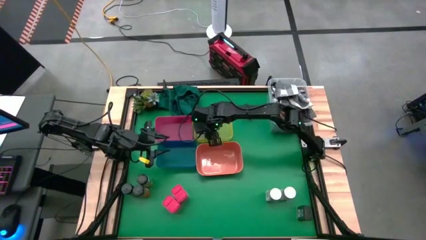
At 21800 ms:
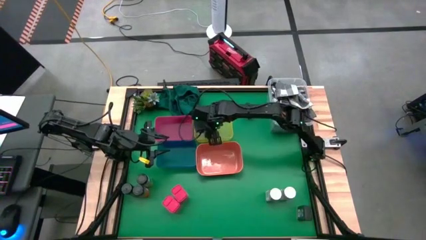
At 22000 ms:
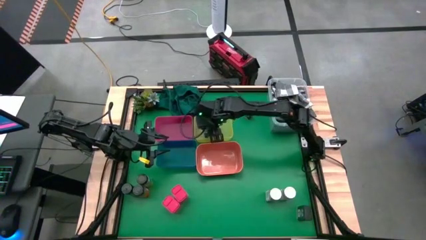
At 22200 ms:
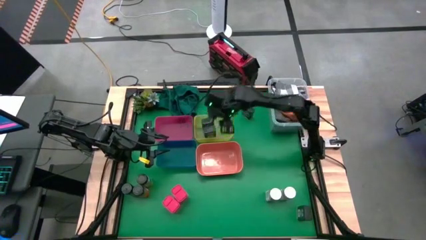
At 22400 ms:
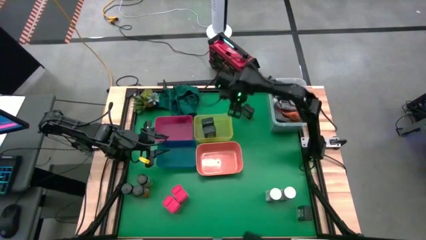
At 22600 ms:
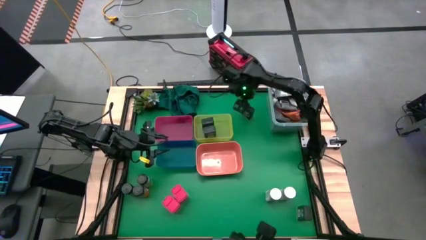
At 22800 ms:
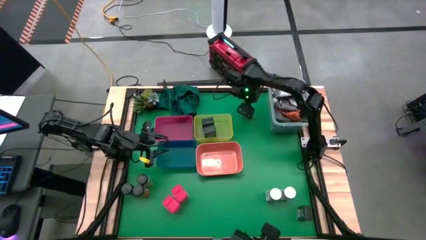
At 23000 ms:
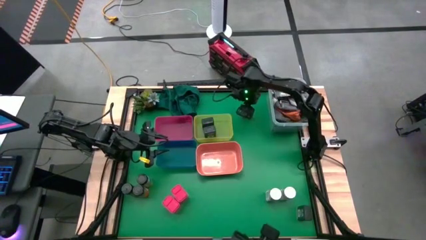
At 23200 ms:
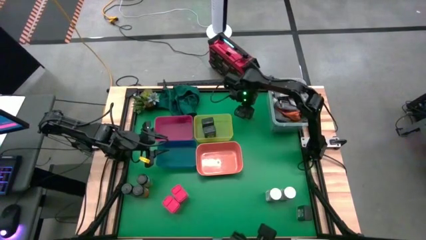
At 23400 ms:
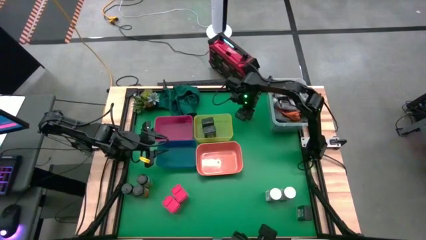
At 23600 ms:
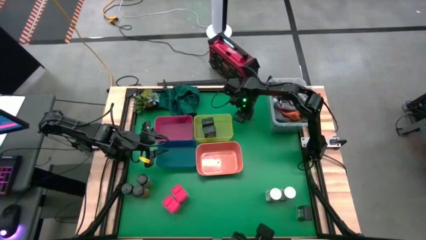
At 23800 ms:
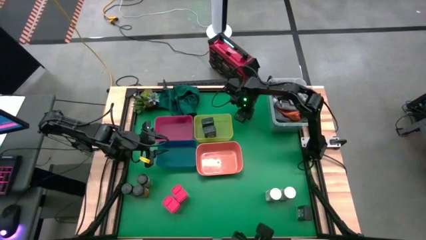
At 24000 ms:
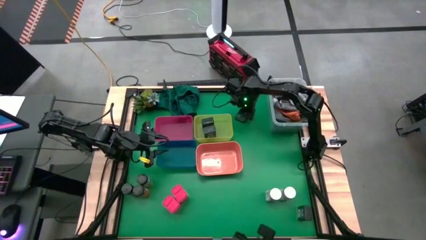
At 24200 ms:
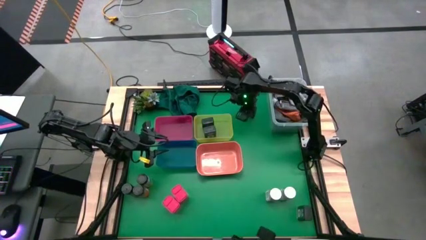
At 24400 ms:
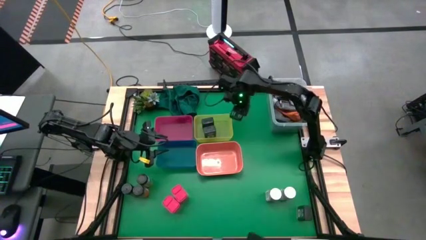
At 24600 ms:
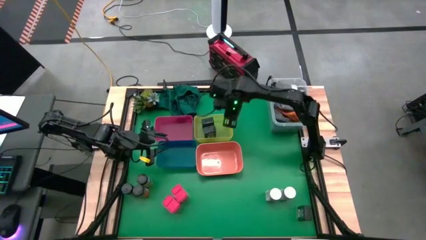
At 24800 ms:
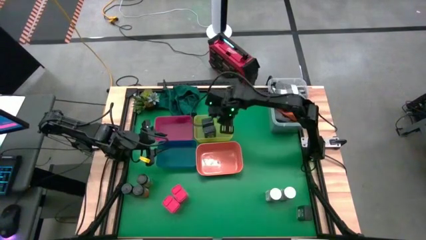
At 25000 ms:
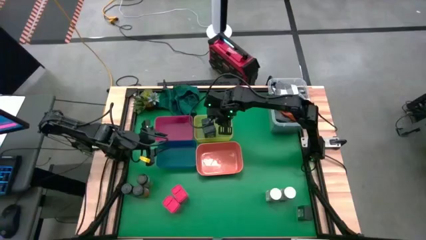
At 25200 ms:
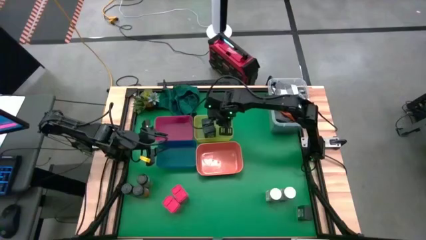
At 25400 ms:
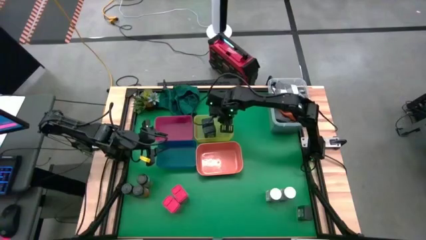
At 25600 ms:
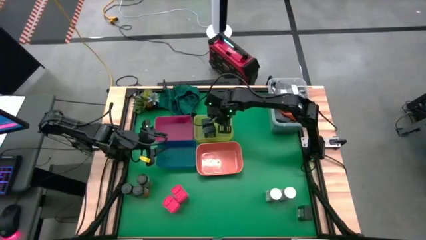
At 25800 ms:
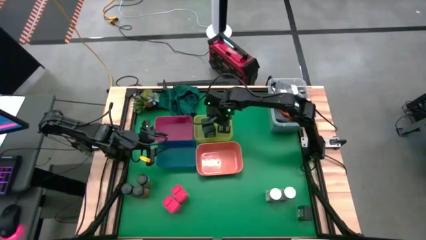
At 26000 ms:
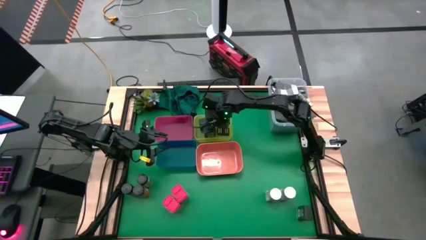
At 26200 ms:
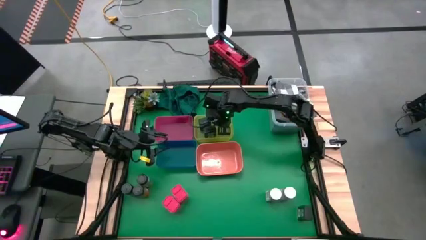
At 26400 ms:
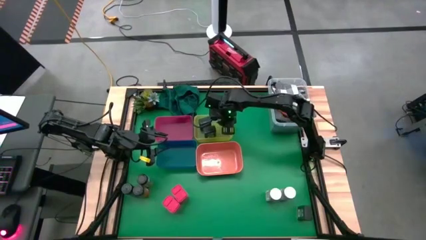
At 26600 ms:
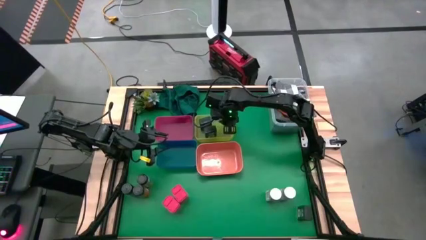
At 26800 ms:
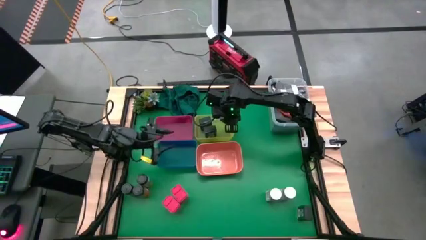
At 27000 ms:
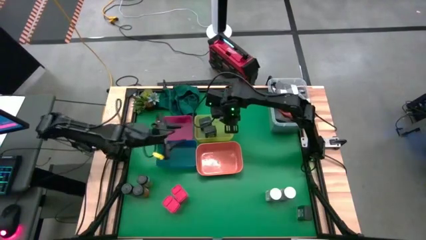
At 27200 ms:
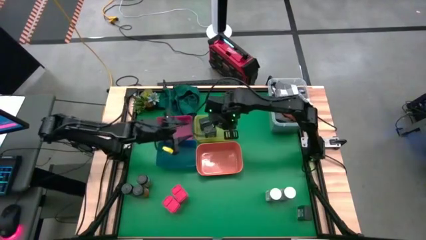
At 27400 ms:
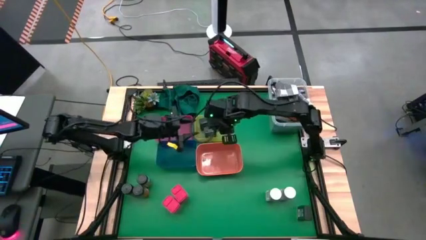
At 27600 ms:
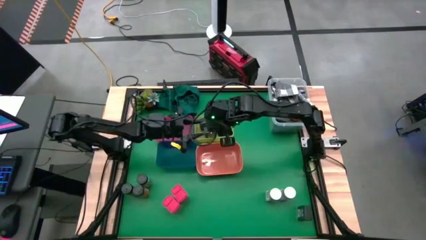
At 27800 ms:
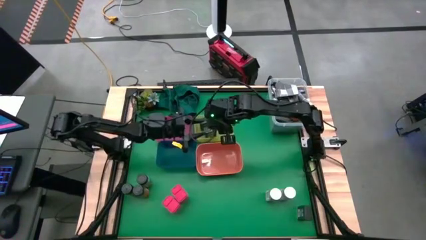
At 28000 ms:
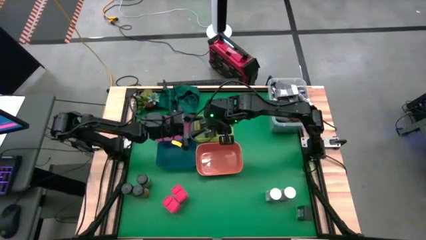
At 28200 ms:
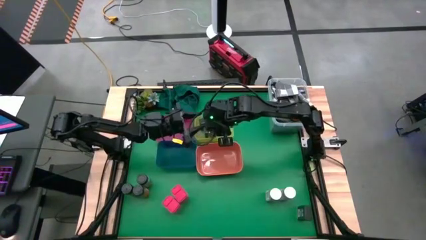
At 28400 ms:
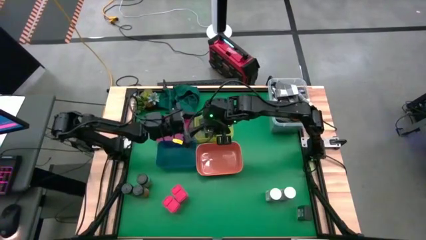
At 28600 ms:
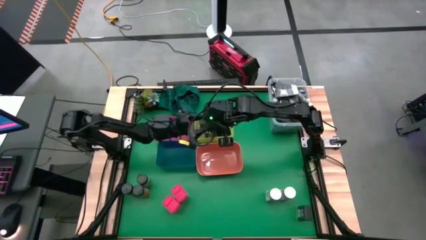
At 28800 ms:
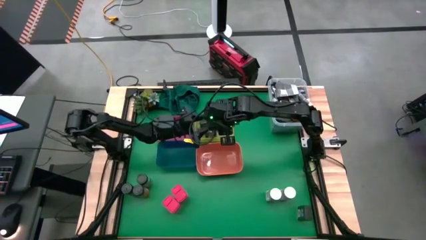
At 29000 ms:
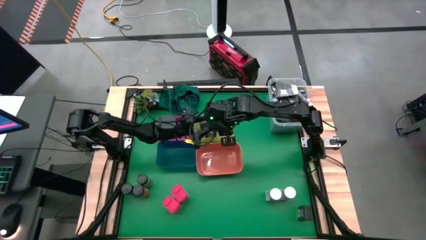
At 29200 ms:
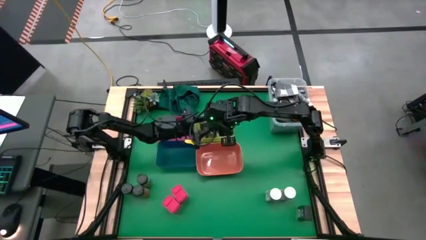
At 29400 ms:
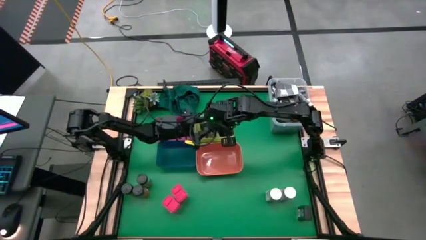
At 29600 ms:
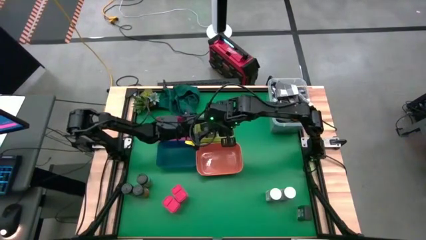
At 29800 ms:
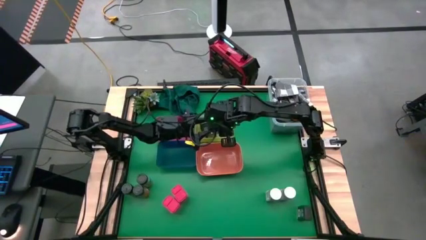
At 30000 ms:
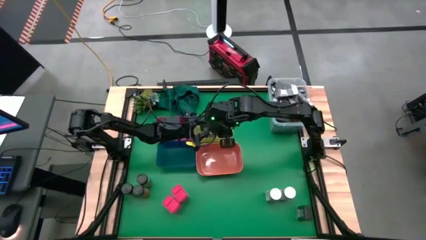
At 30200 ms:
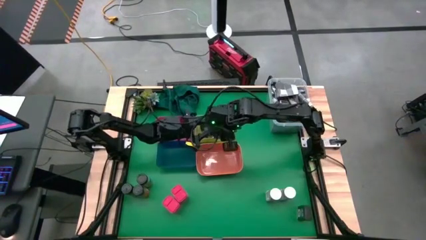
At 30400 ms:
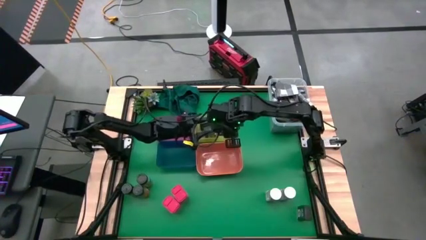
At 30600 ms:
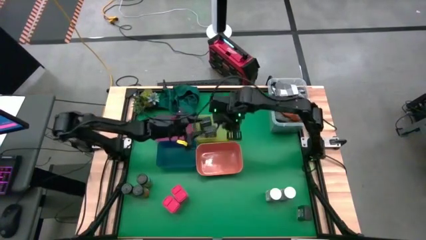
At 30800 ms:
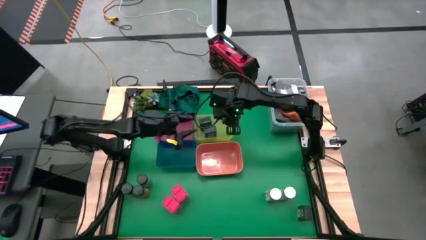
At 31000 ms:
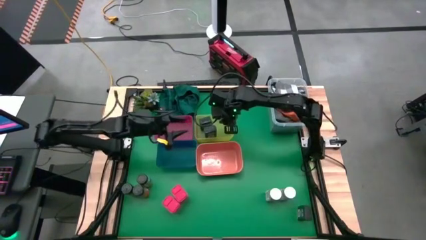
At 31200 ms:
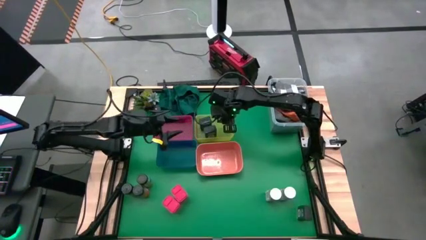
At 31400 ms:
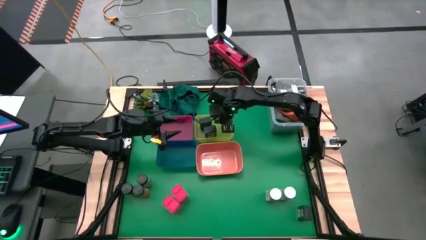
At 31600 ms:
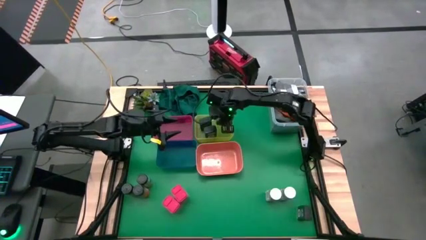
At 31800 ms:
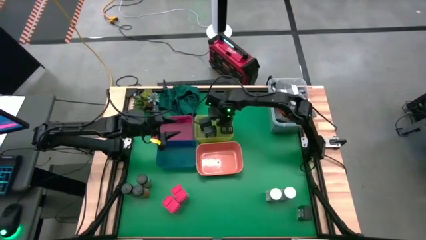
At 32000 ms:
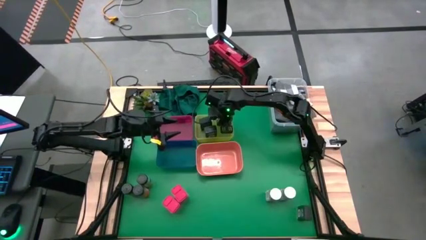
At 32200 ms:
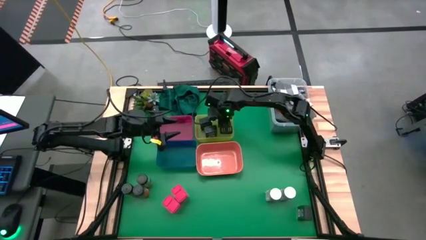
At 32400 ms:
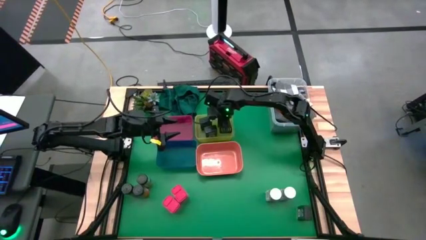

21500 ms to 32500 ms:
Task: Sort spices by type
Put the top black seasoning can into the yellow bin

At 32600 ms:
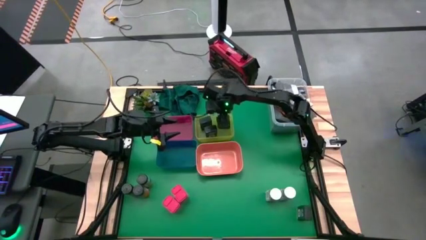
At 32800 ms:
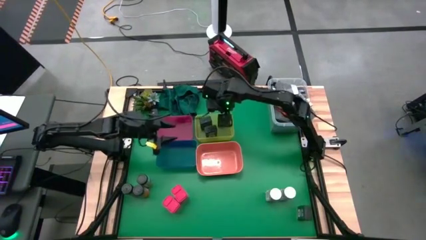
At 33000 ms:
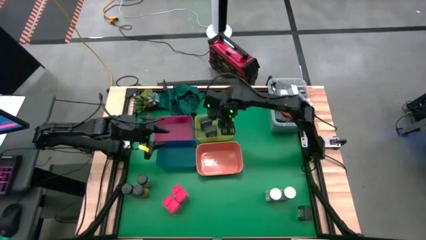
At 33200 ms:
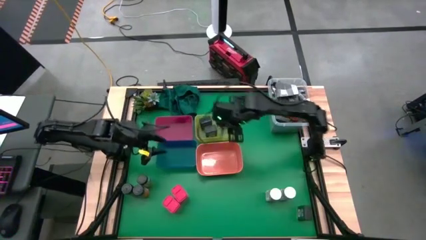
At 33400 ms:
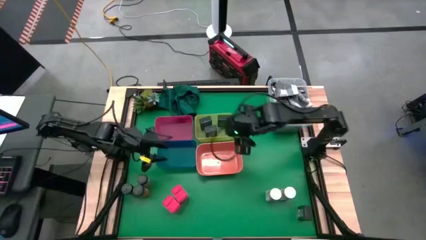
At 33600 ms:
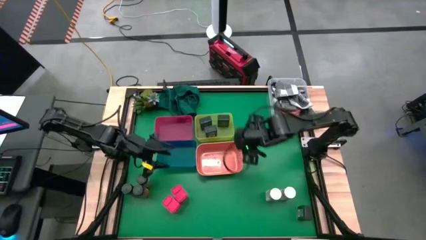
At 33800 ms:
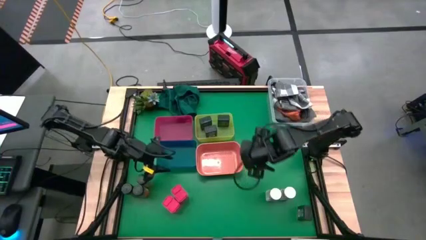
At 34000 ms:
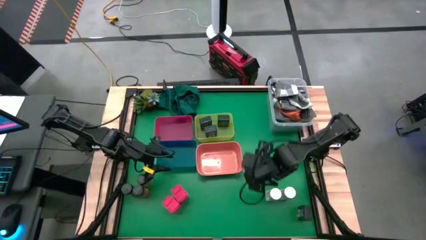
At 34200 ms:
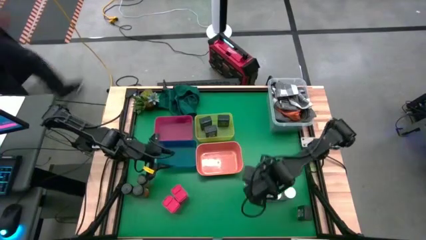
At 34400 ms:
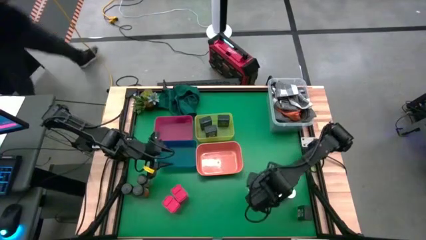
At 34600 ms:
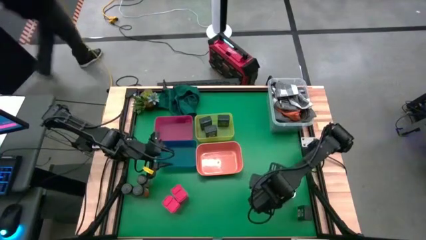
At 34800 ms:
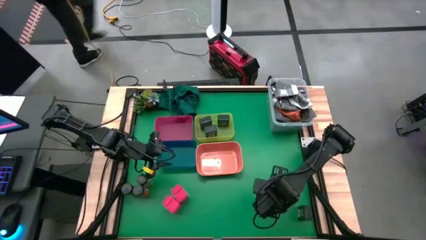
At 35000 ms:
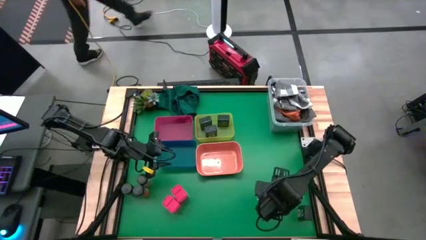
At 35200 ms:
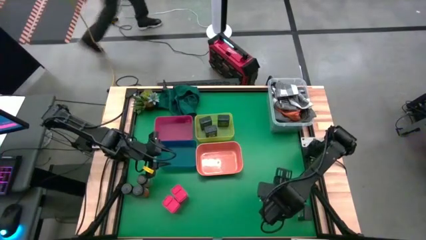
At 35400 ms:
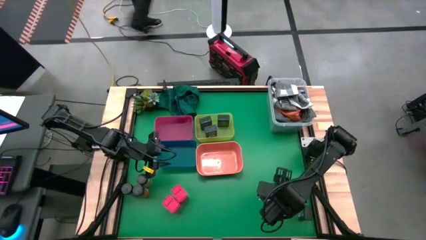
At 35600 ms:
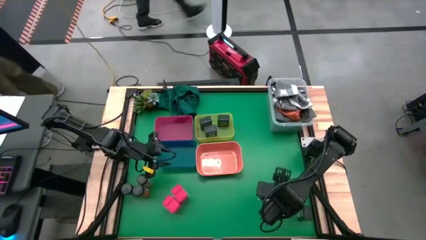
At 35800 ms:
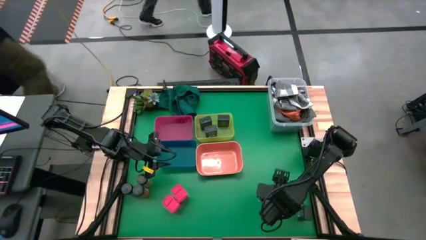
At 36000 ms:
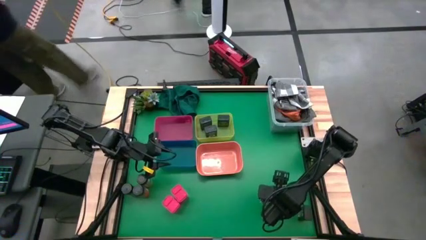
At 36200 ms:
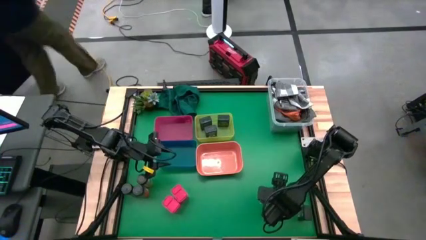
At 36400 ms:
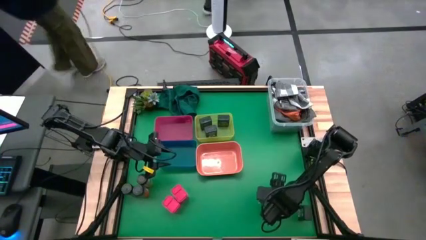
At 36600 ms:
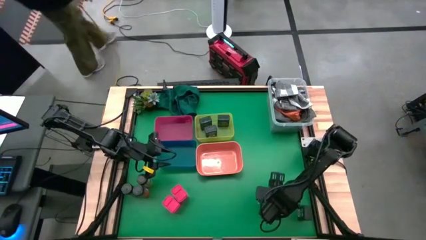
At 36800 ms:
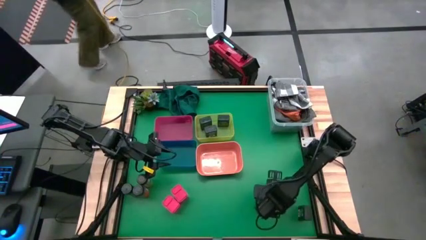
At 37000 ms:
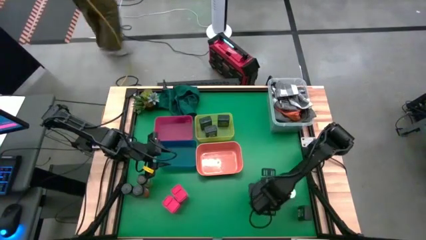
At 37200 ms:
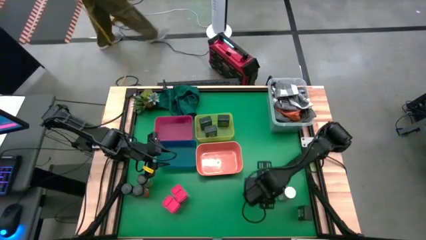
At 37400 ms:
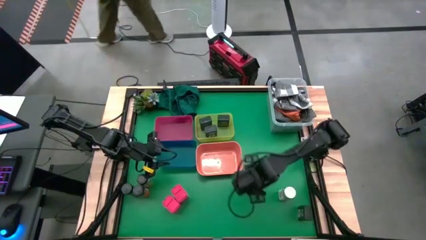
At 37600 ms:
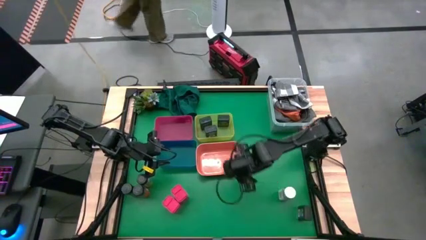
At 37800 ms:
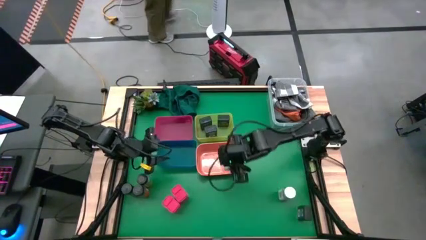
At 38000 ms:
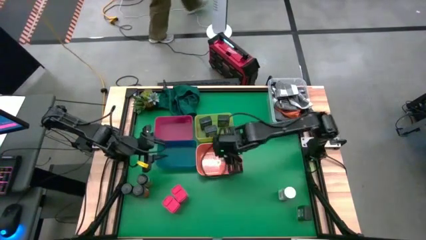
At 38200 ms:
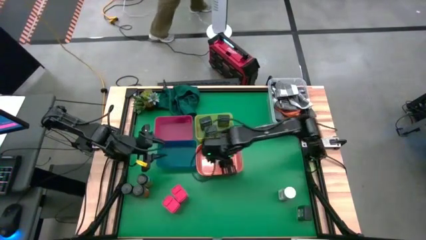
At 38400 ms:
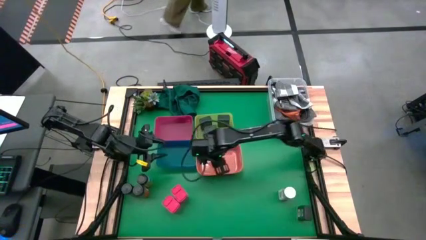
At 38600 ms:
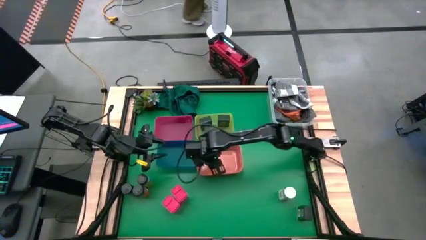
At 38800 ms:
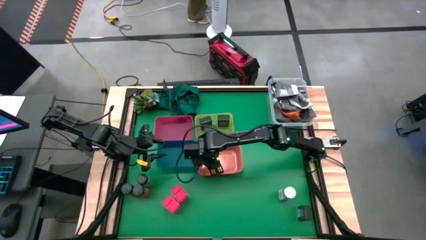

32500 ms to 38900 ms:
Put the left white seasoning bottle into the orange bin
